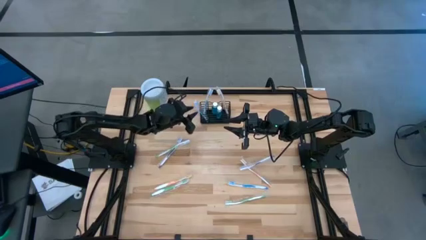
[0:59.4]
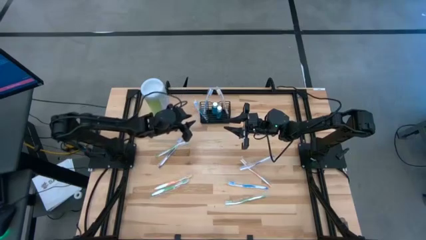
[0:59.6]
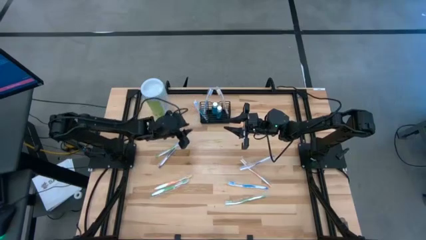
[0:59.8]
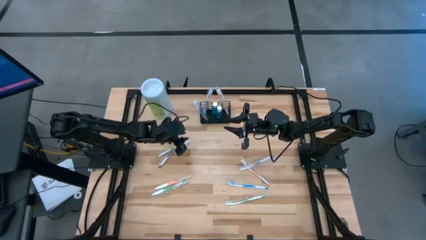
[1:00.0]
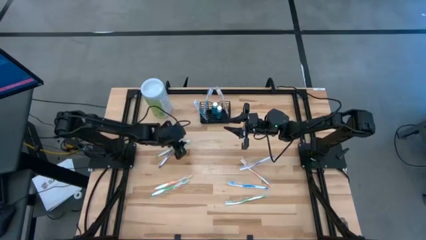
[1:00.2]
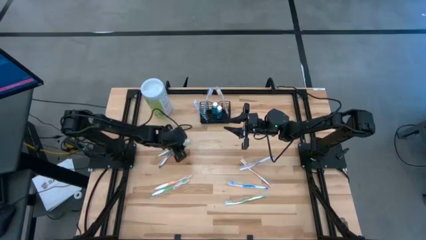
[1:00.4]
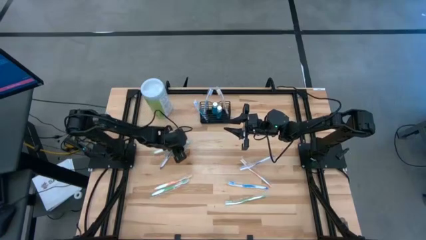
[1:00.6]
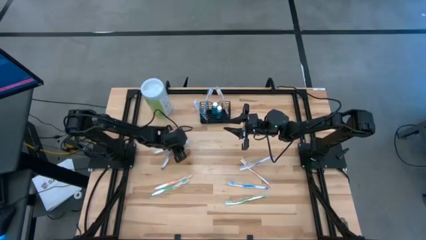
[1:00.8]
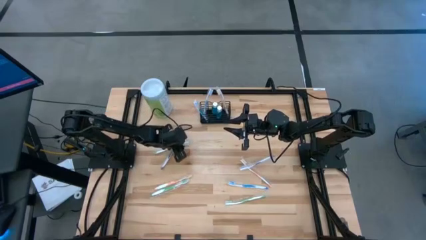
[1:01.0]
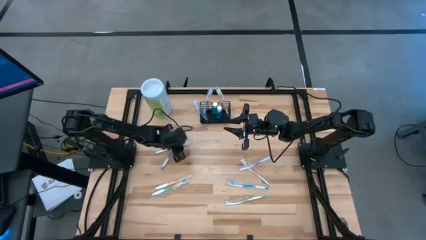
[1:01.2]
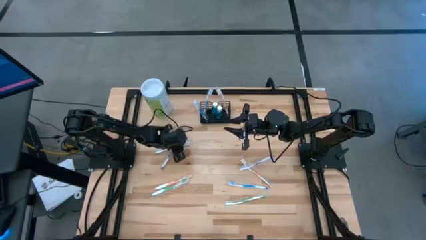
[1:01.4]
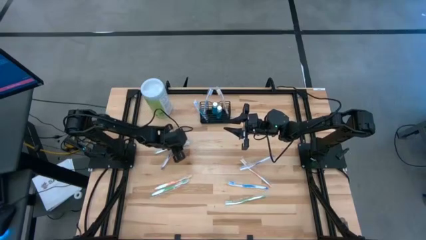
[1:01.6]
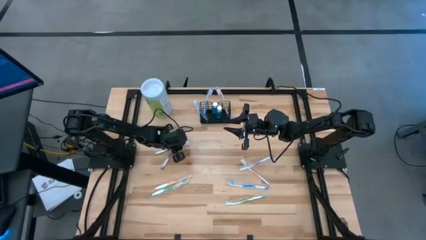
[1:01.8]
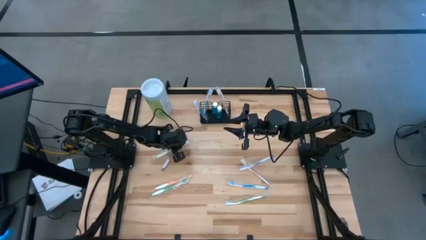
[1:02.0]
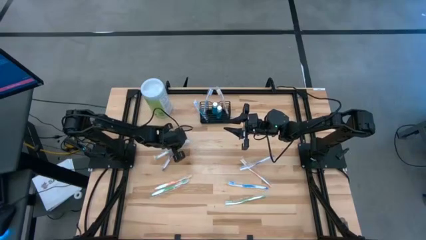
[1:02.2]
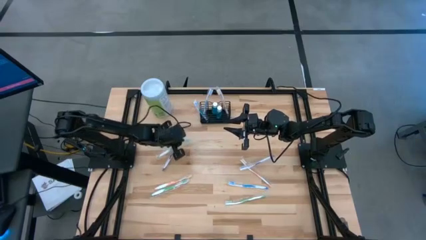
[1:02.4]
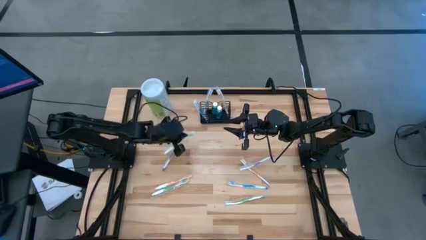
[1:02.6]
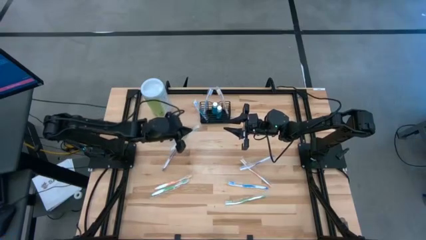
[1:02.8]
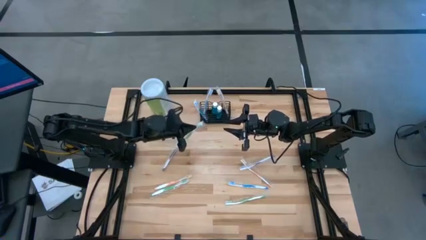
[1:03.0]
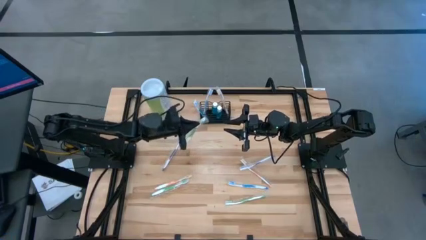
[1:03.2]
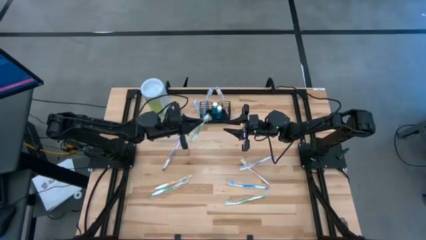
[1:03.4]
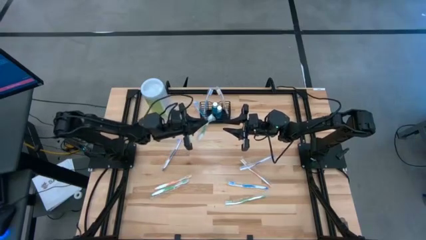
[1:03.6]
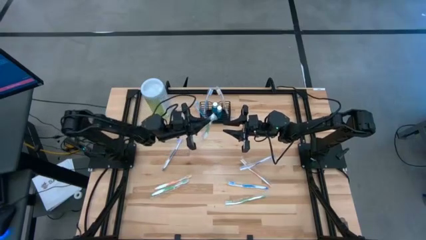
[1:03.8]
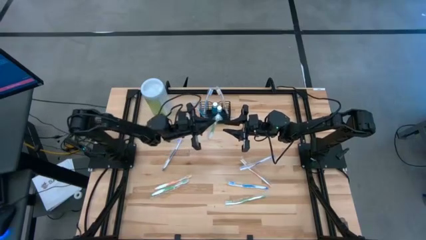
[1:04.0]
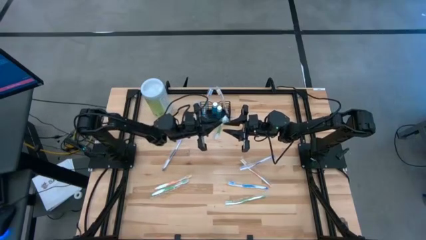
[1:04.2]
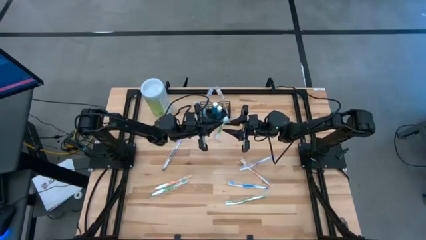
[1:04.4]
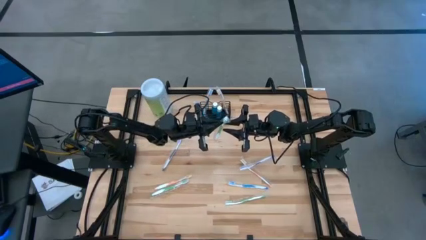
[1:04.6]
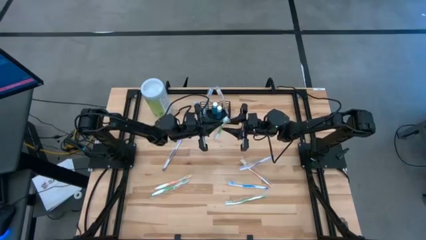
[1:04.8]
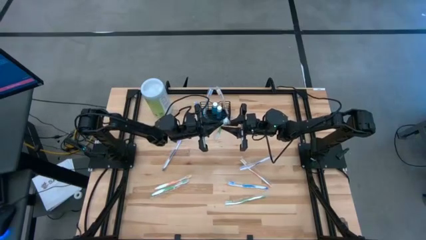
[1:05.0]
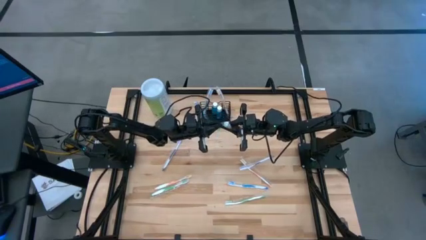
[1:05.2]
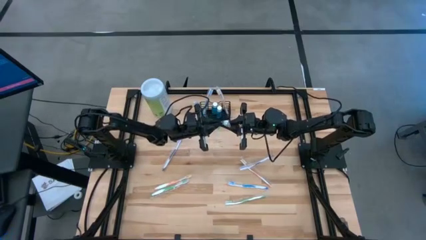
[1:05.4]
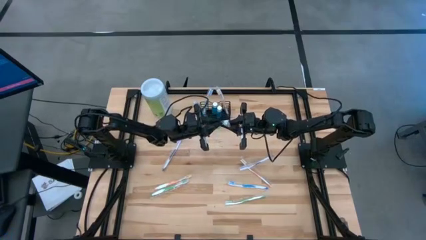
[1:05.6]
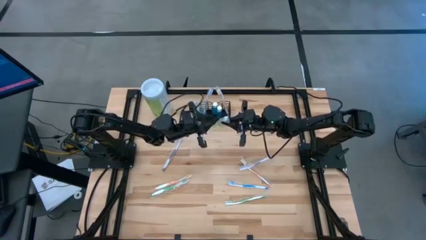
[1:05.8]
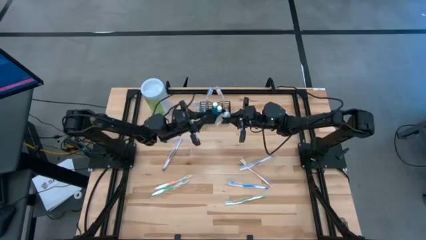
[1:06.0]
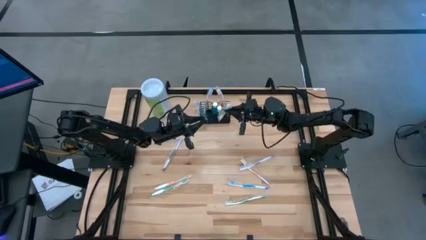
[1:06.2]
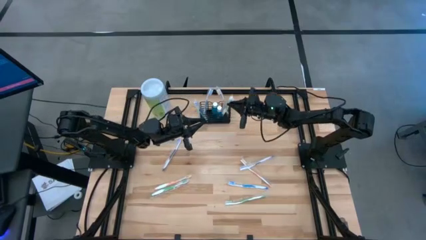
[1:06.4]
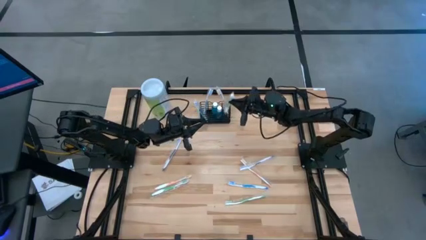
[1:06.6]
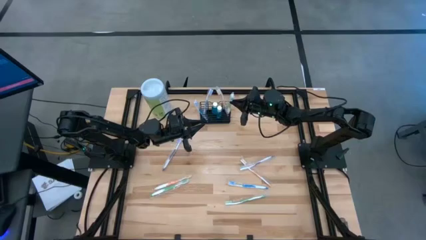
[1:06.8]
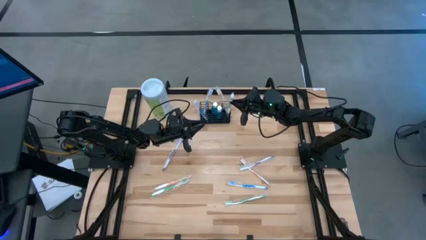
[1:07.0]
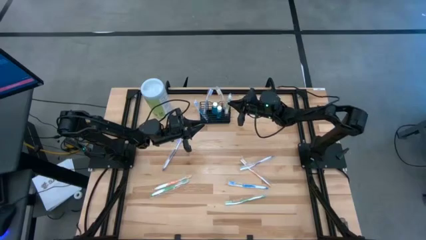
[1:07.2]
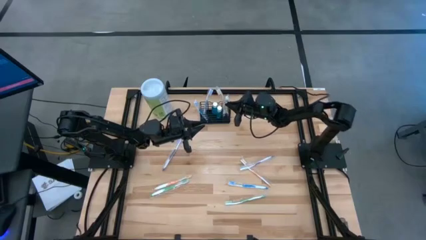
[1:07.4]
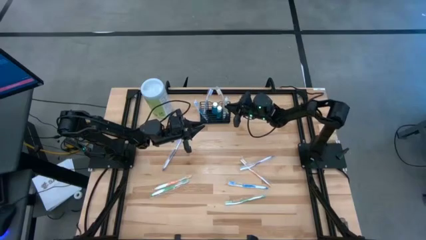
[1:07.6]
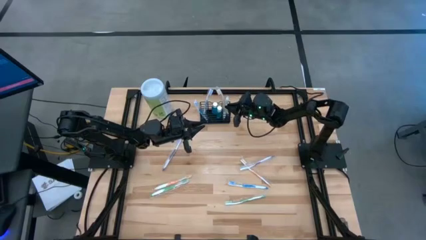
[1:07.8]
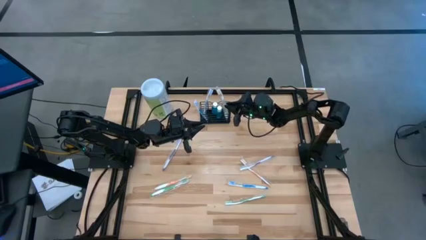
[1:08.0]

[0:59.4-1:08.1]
Task: Pick & Place toothbrushing station
Put the green toothbrush into the black wire organizer

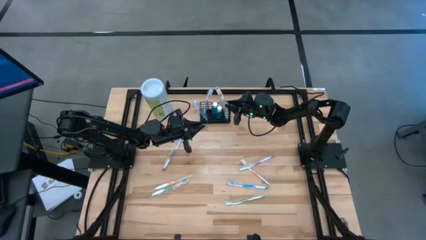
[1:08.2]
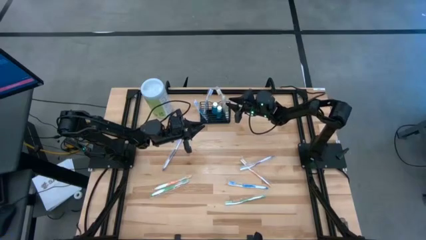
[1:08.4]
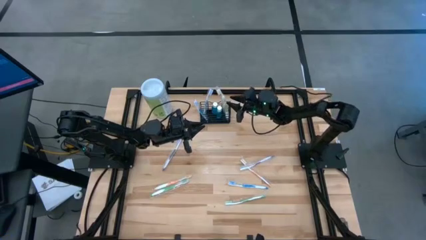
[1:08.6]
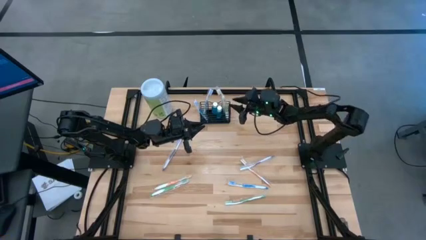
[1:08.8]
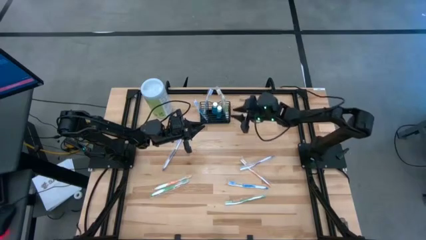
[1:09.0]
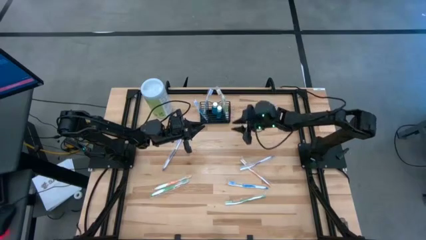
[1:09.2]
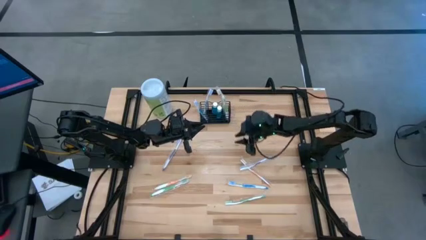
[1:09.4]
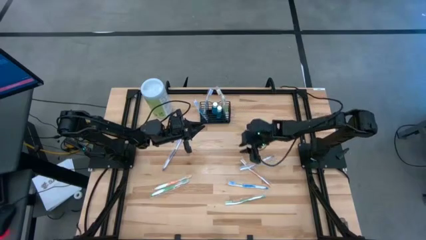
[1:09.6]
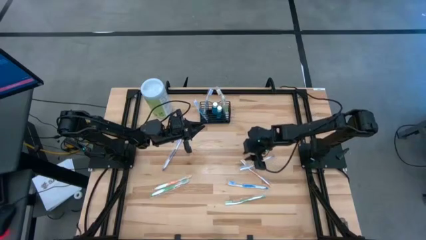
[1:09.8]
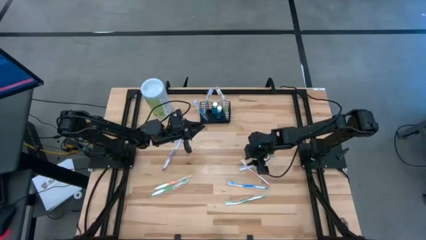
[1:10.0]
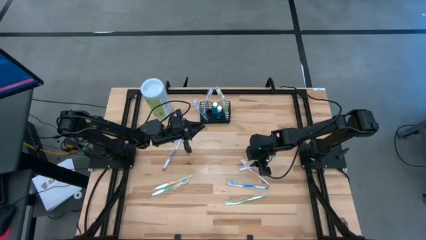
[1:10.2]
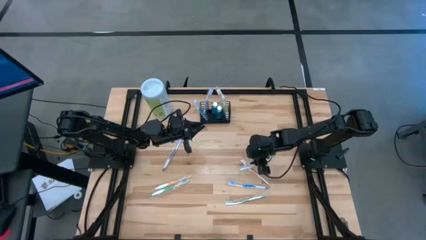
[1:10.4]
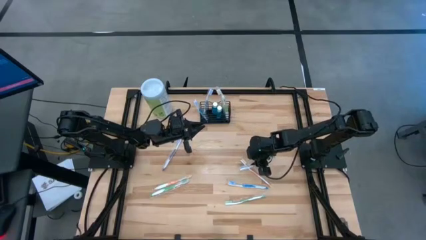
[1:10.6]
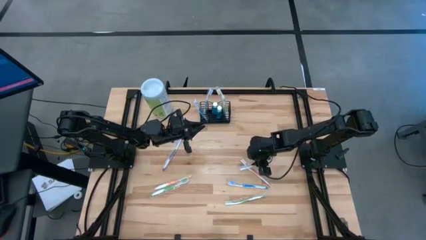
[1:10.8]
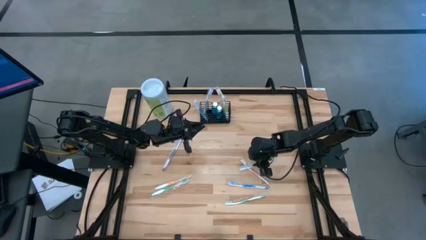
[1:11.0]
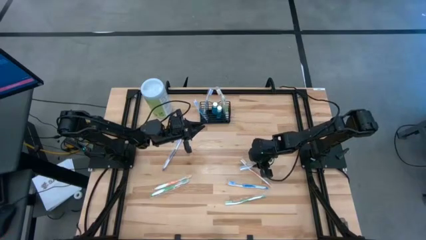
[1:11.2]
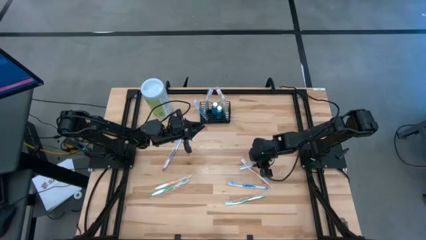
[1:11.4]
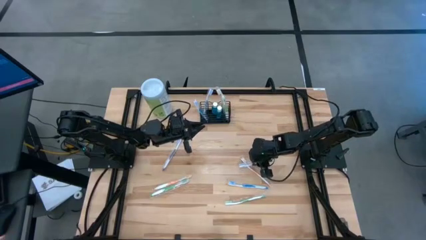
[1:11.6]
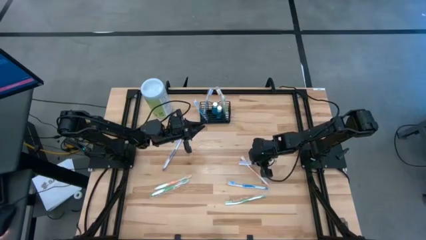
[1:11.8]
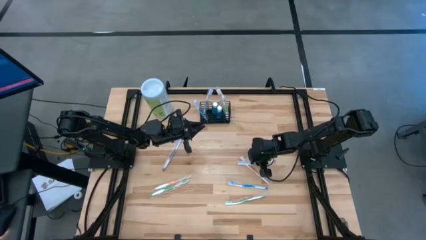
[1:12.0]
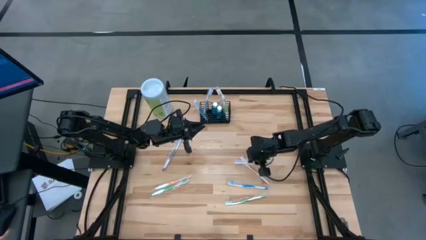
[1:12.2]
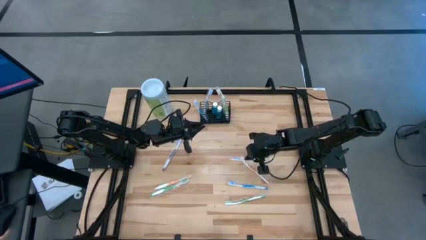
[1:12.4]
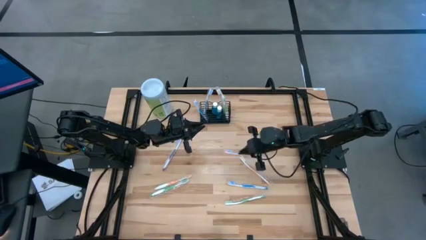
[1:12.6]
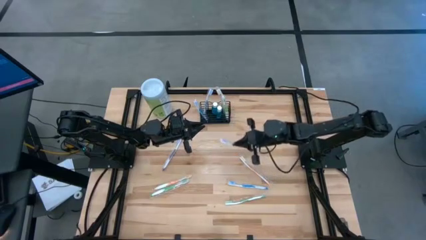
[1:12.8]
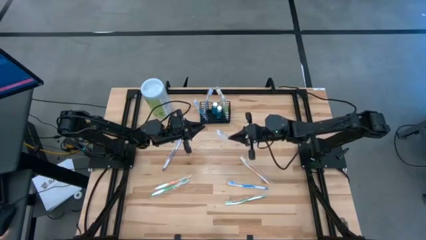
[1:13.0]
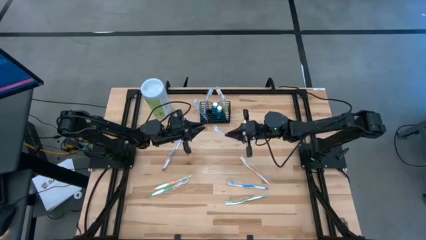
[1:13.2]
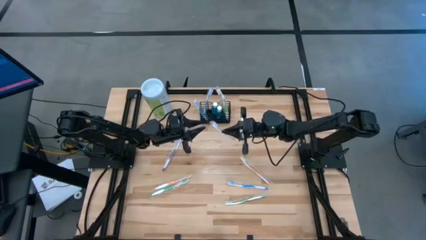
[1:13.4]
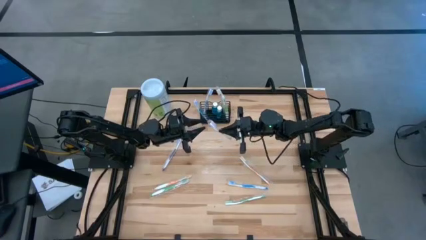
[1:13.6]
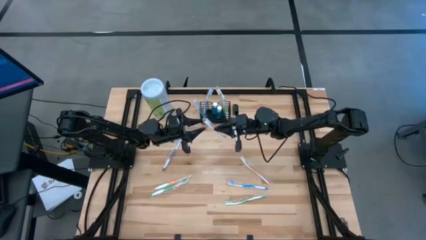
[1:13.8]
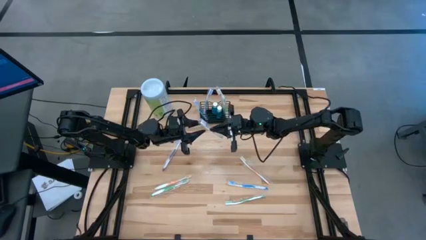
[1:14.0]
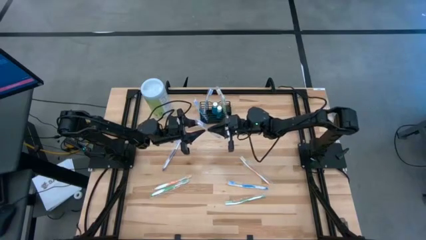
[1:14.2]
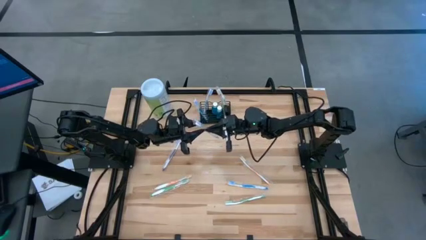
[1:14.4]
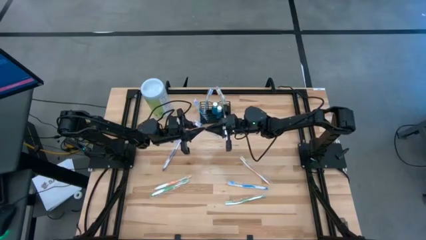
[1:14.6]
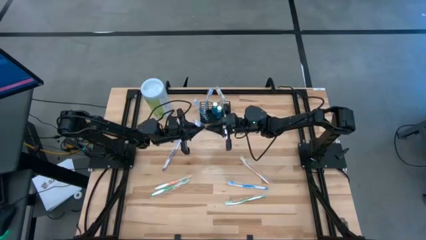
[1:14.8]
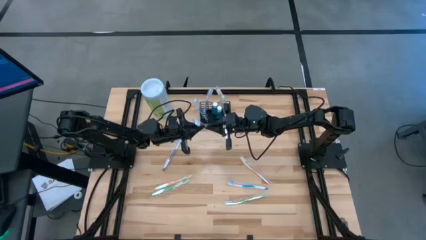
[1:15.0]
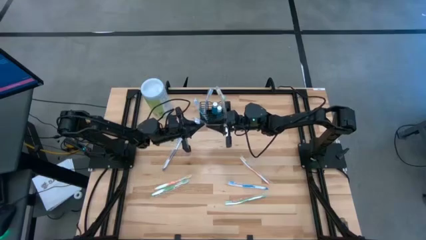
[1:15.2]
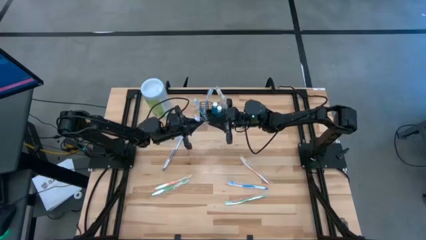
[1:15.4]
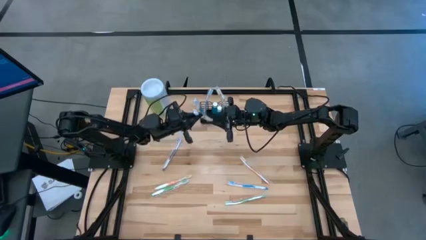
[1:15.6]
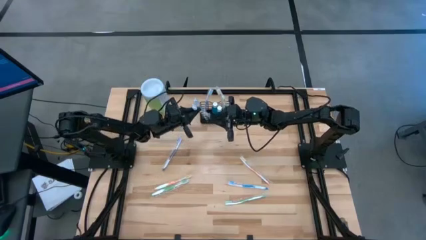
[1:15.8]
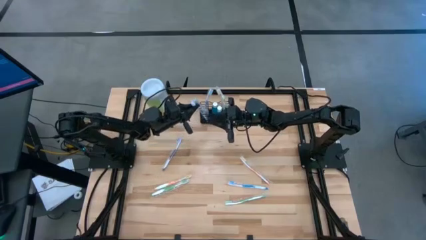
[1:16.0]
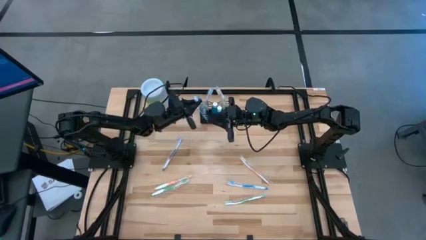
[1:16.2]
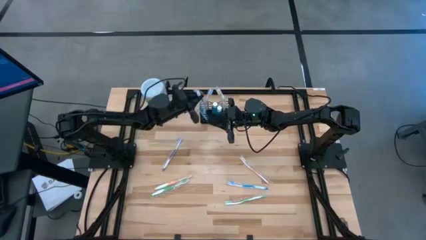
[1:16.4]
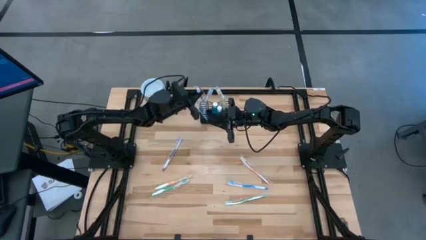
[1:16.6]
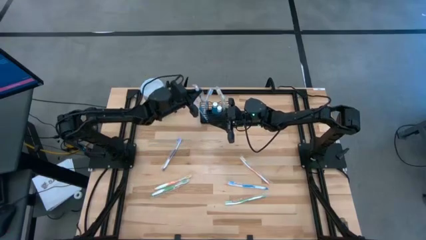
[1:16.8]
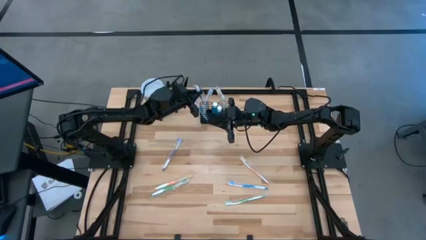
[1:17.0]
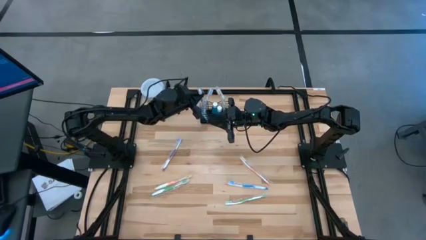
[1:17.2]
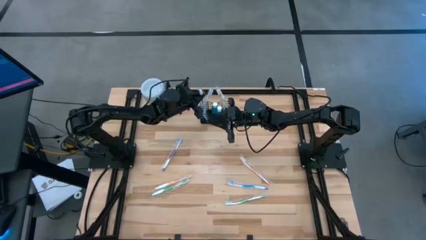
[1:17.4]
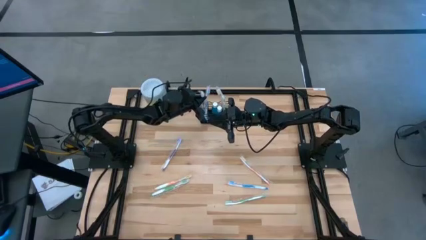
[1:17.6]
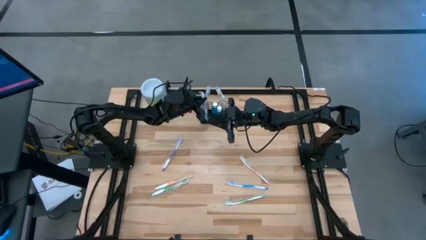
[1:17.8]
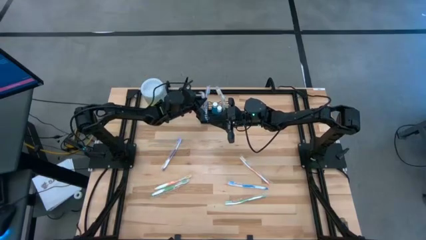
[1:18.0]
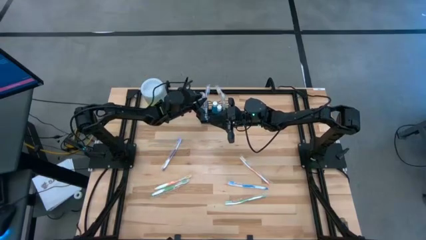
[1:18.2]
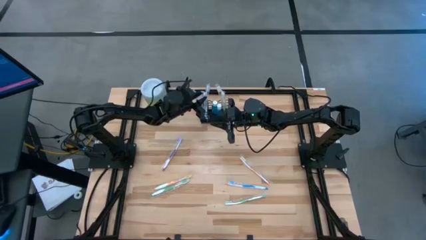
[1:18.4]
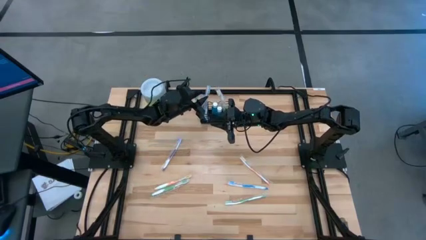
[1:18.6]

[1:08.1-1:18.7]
Put the purple toothbrush into the black wire organizer
